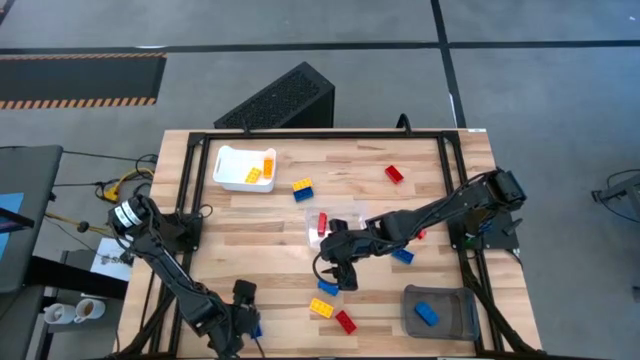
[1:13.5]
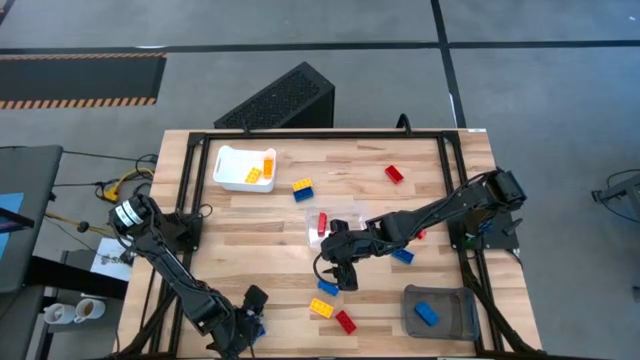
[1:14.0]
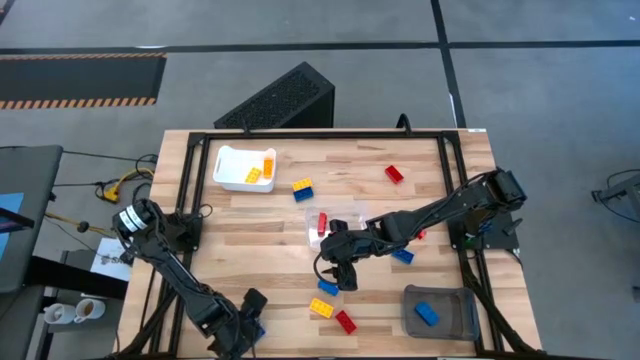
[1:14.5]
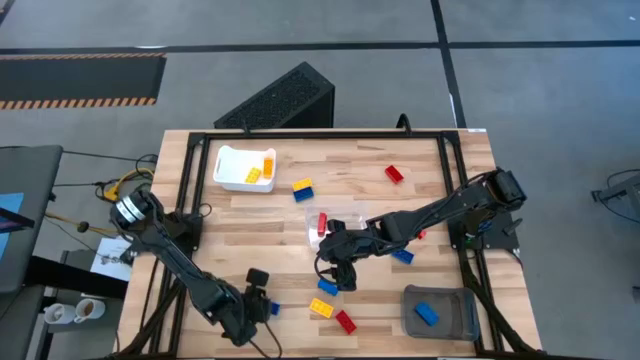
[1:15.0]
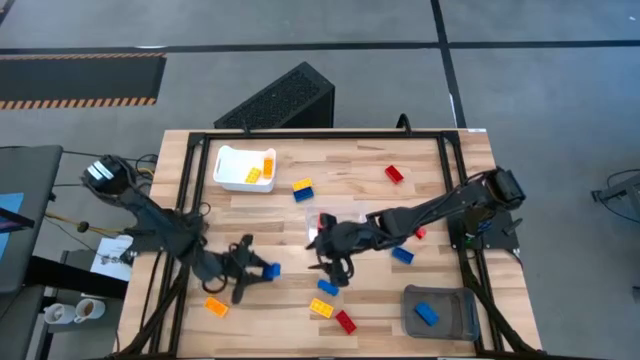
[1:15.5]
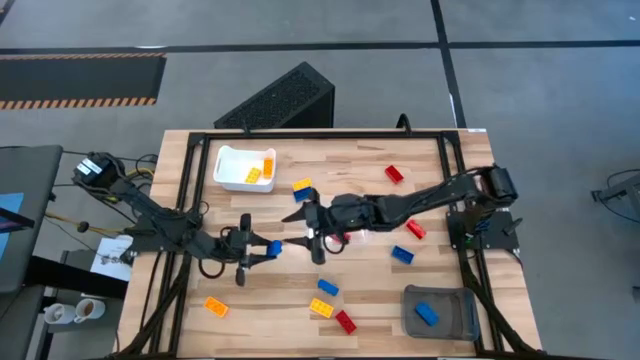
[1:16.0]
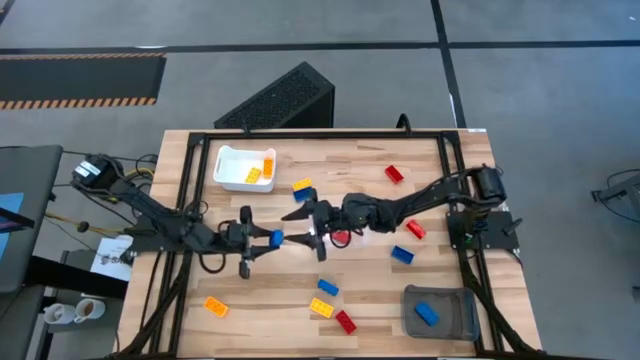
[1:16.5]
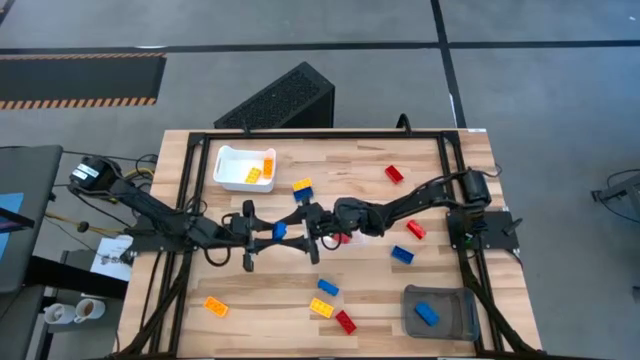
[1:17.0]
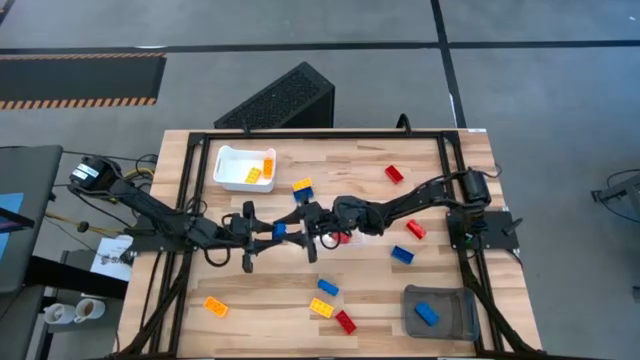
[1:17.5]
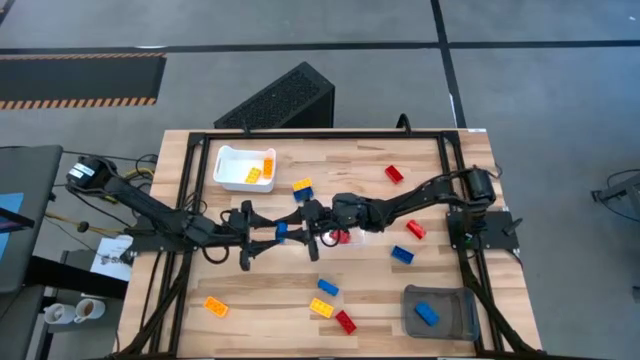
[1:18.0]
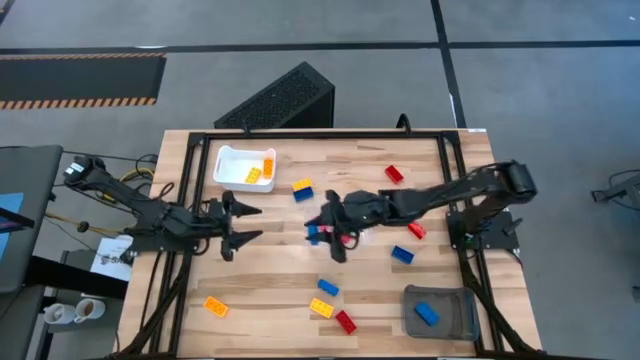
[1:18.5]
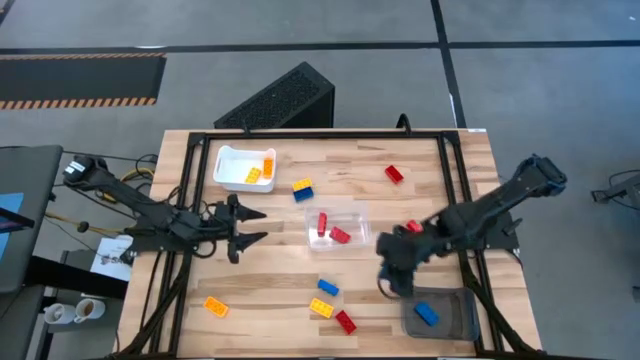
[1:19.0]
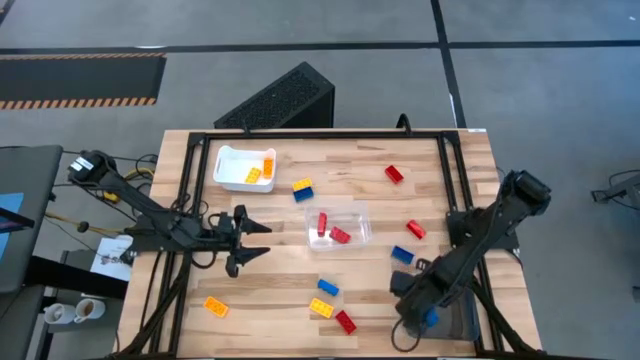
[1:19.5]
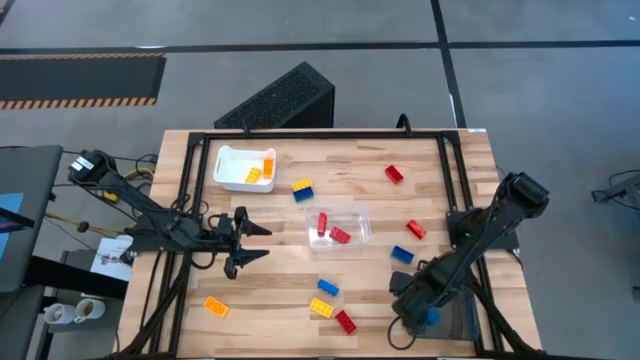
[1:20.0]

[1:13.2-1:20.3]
Task: Sort & place blocks by color
Put the blue game piece into the black bin

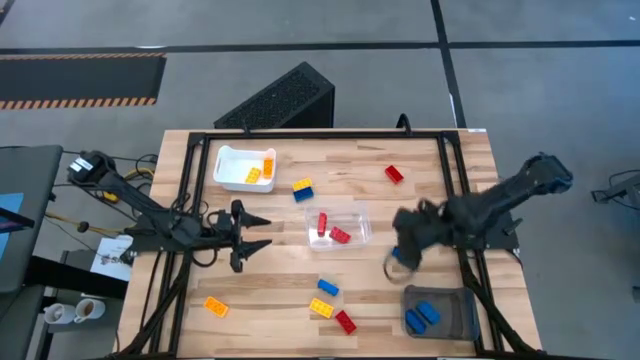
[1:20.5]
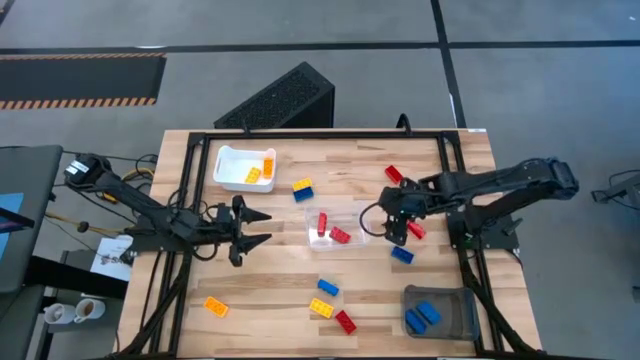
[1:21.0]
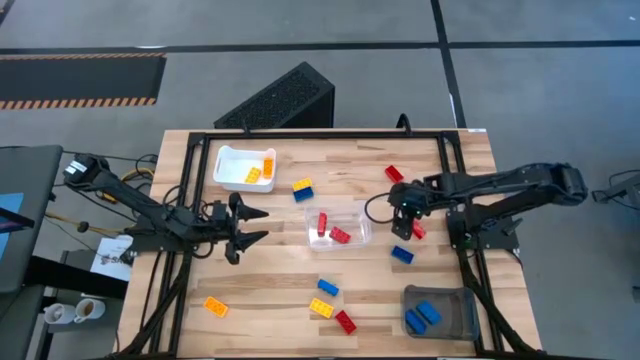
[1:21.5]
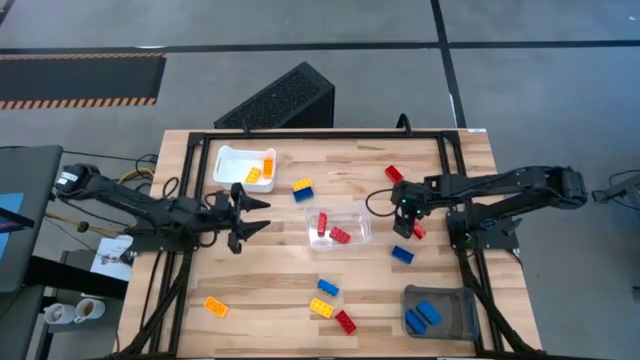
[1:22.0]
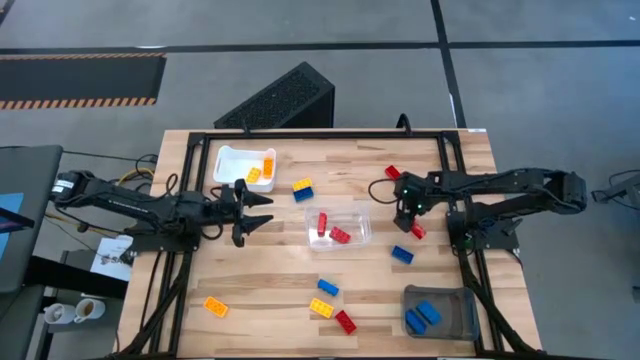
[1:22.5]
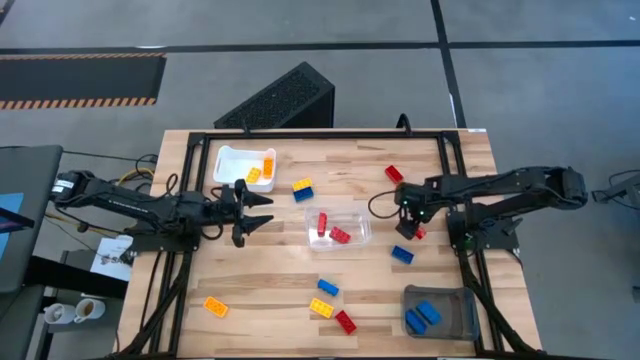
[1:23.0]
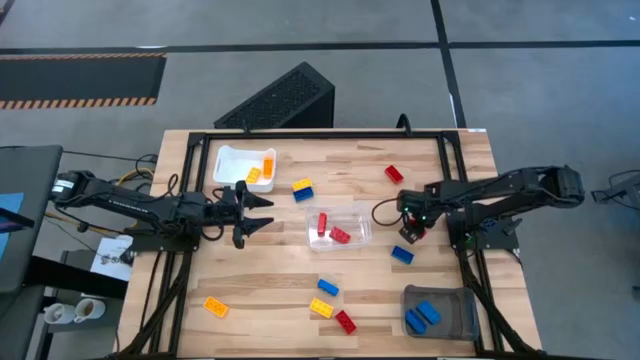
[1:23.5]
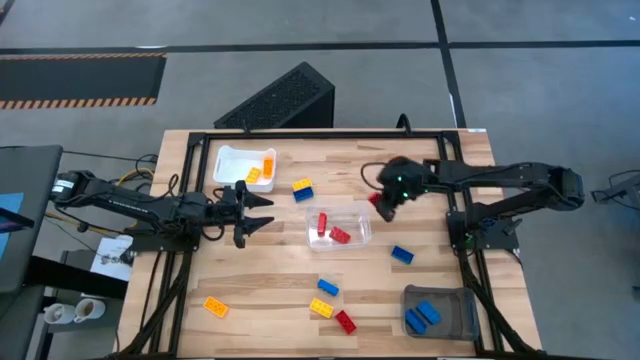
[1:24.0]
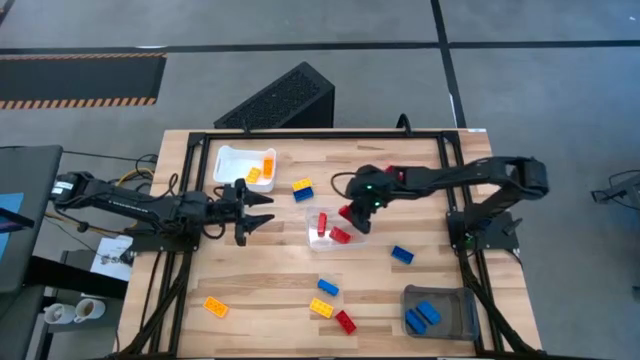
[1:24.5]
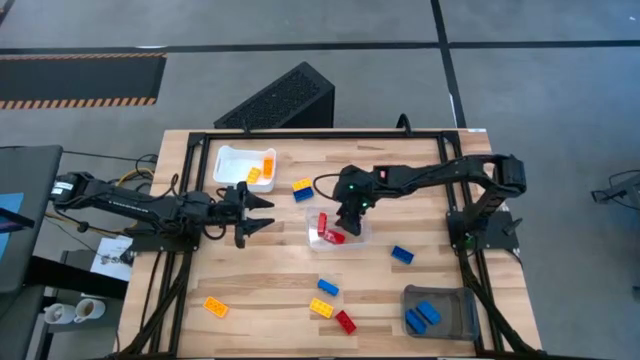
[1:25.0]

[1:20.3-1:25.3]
Put the red game piece into the transparent bin

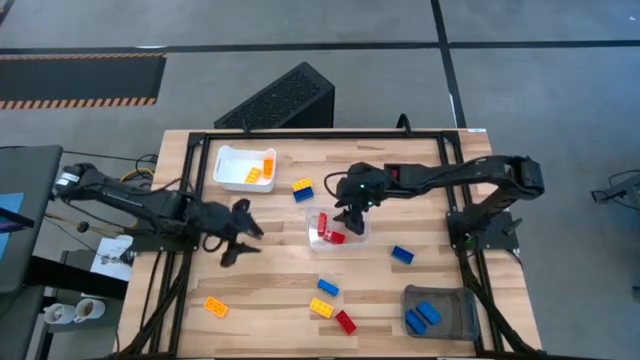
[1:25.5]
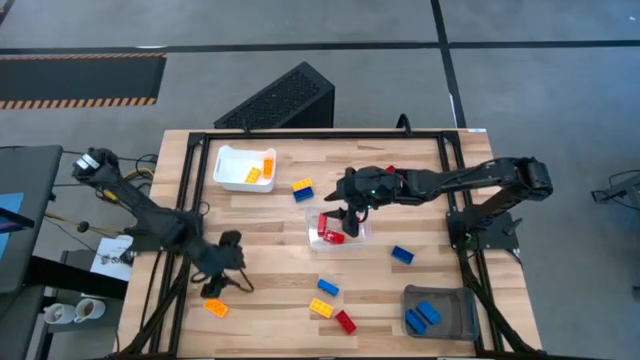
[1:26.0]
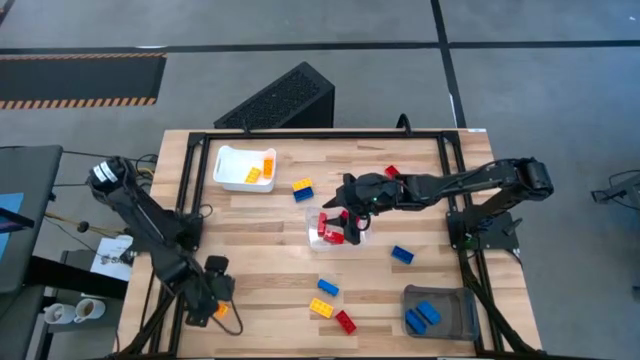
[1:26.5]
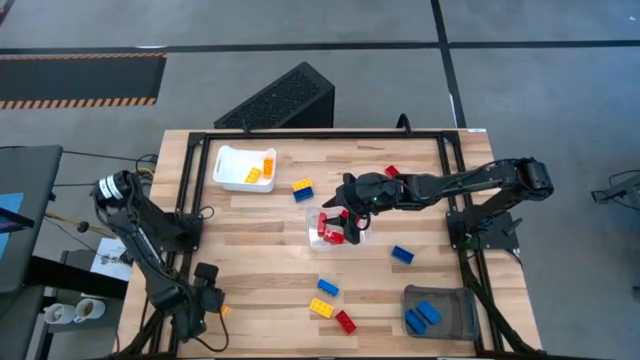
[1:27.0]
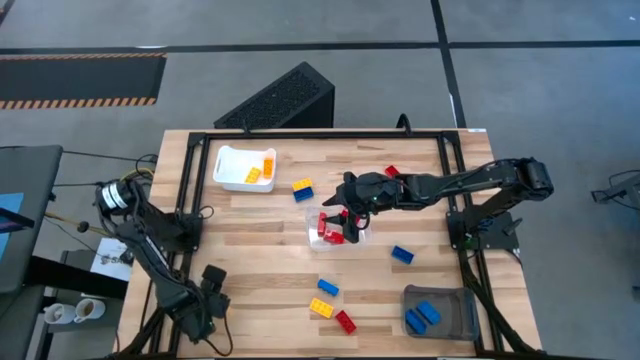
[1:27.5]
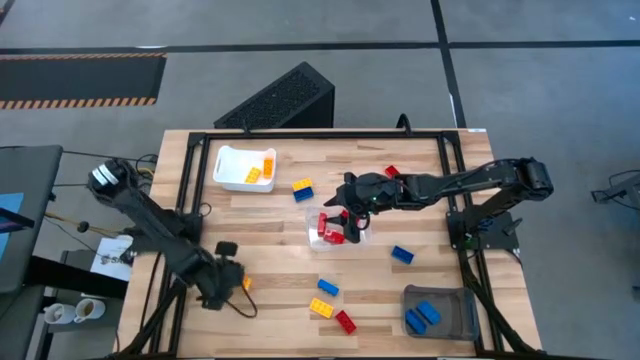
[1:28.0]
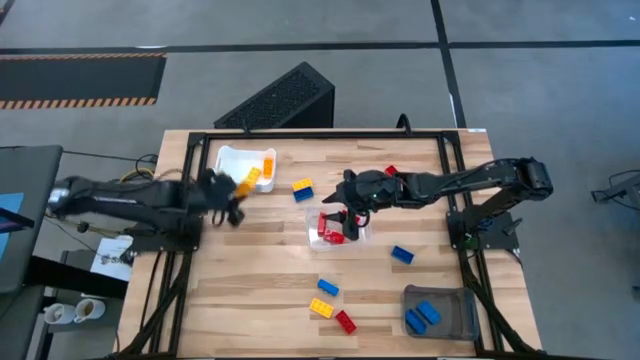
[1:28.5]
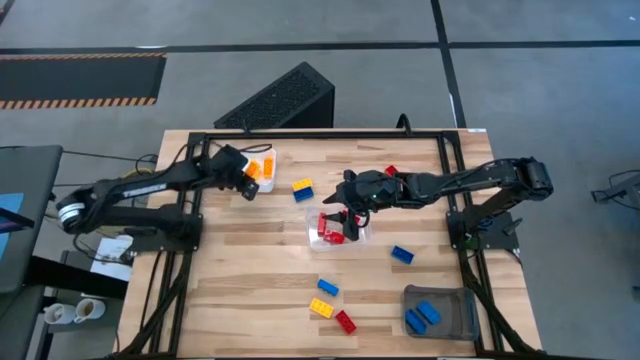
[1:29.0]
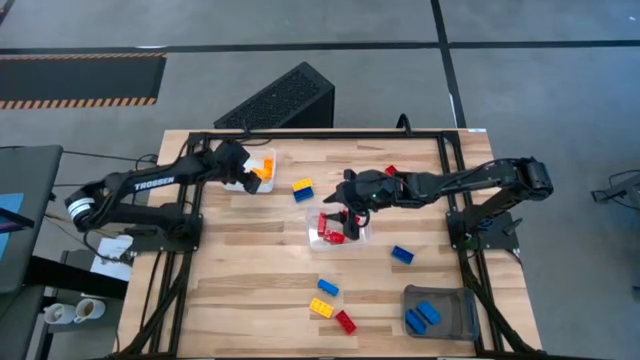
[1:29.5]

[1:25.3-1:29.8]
Put the yellow game piece into the white bin

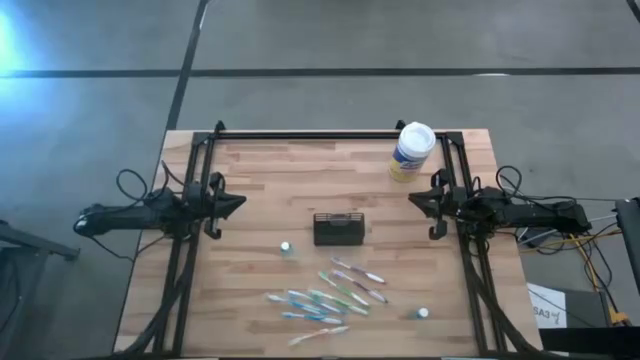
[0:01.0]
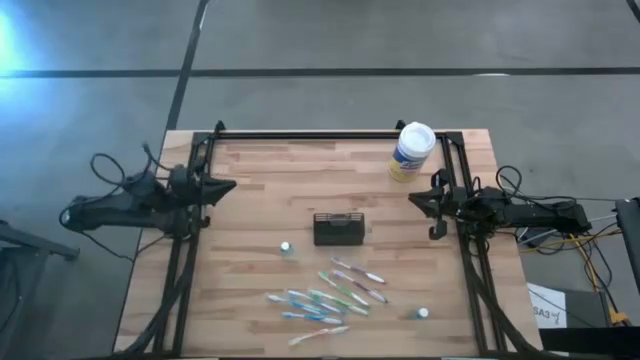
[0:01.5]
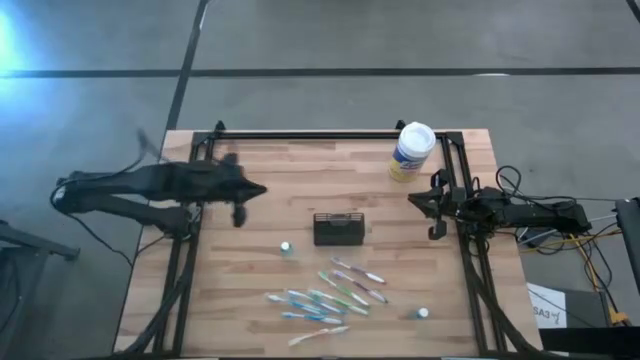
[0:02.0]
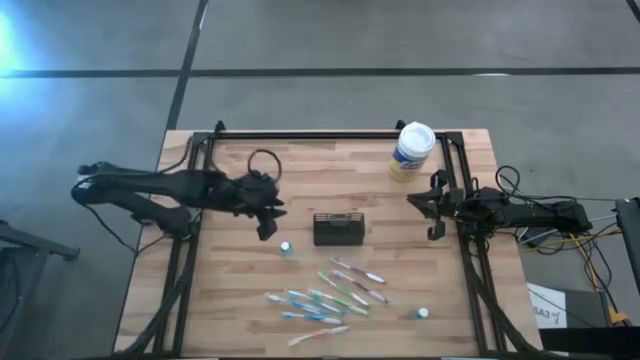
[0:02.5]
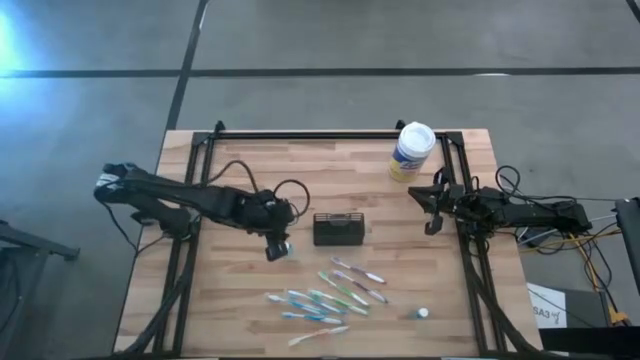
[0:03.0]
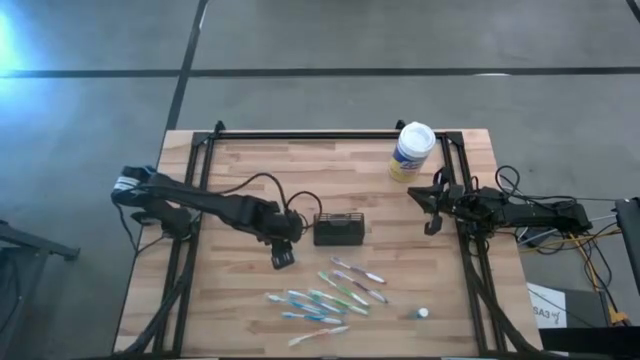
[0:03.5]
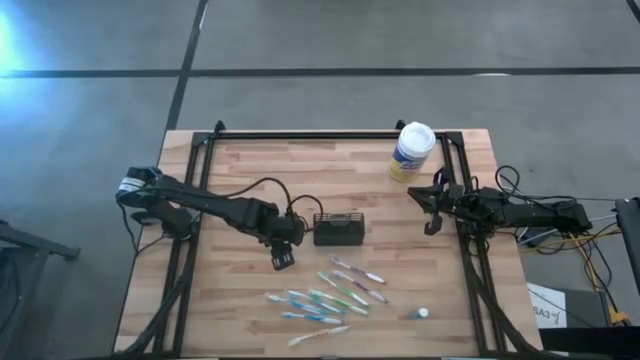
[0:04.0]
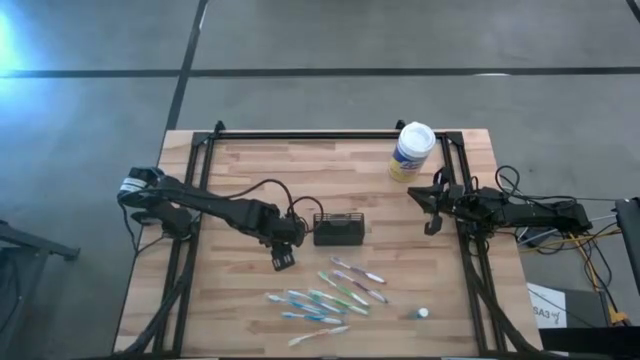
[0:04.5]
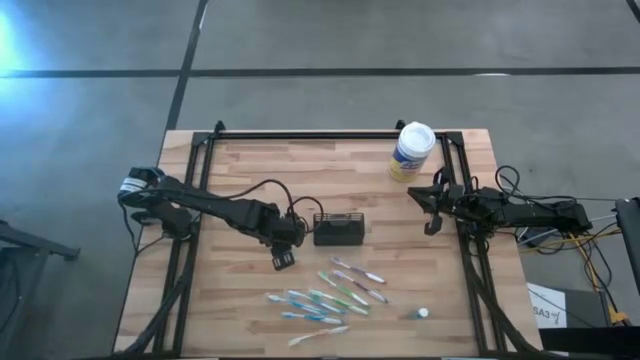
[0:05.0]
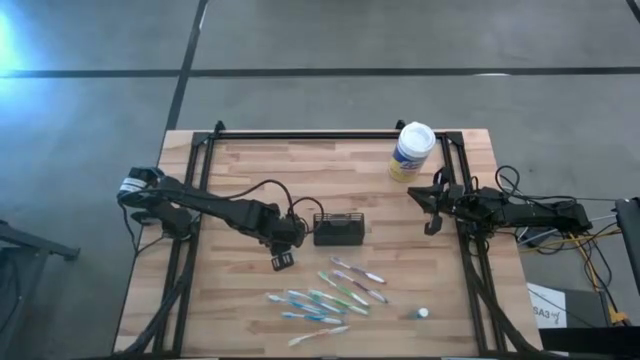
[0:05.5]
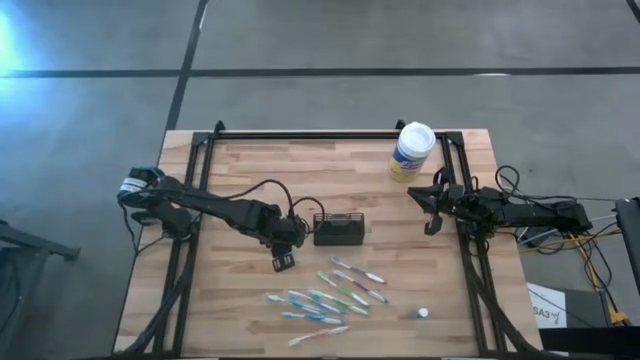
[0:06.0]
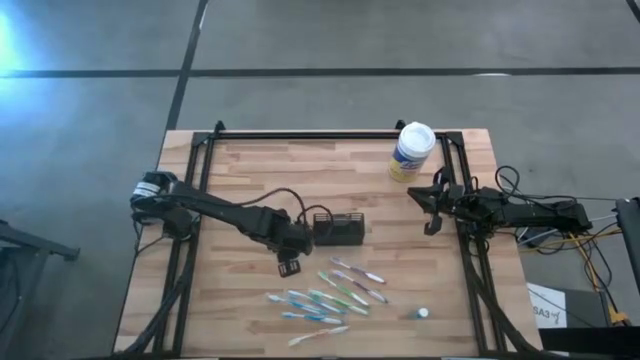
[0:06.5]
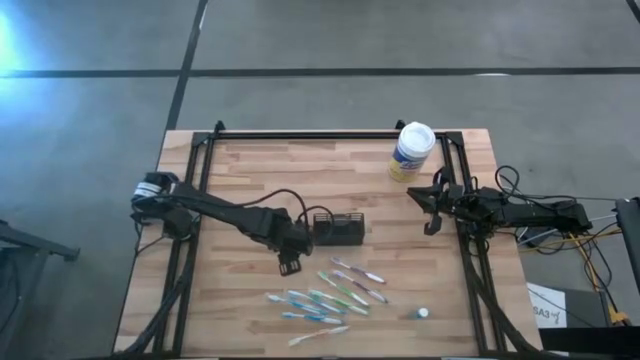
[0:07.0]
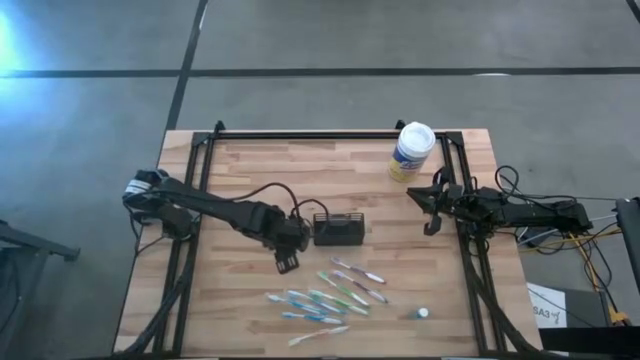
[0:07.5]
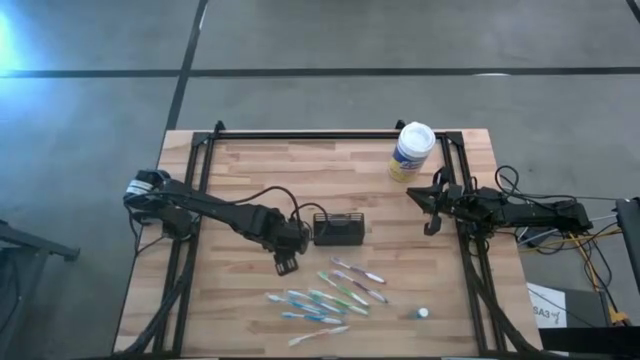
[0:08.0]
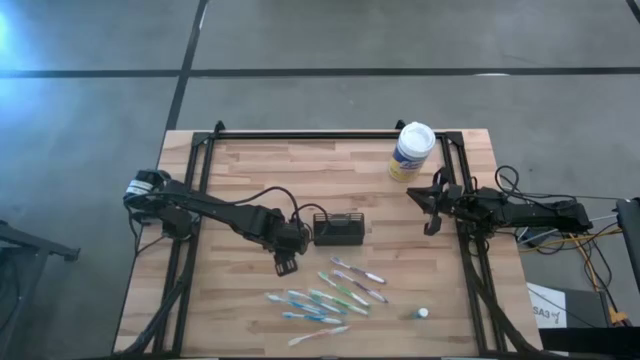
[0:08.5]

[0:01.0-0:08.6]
Task: Pick & Place toothbrushing station
Put the top blue mouthwash into the mesh organizer
